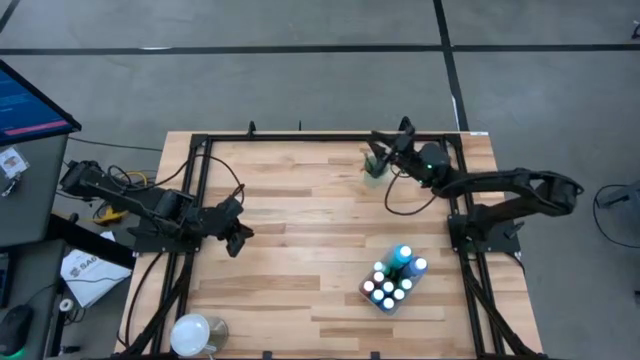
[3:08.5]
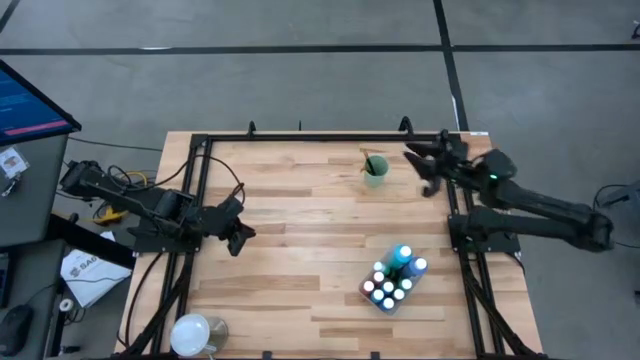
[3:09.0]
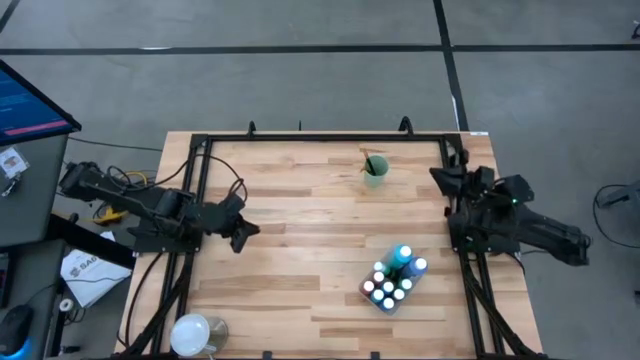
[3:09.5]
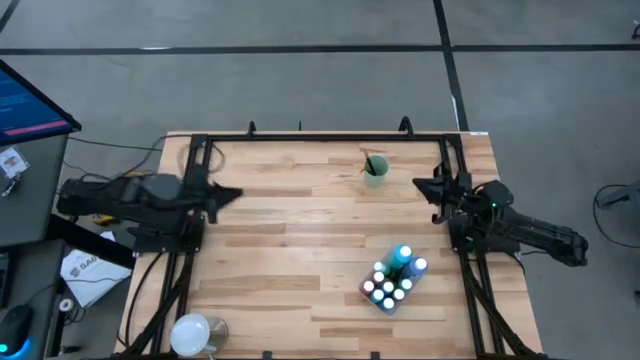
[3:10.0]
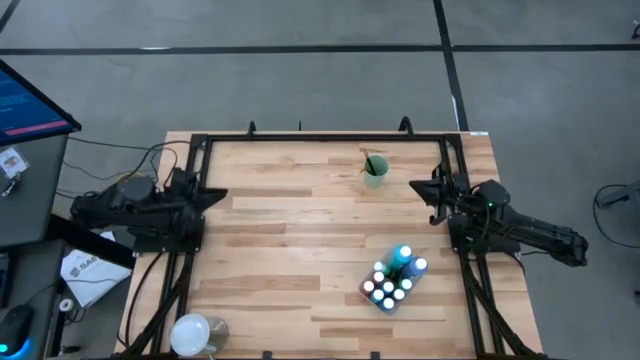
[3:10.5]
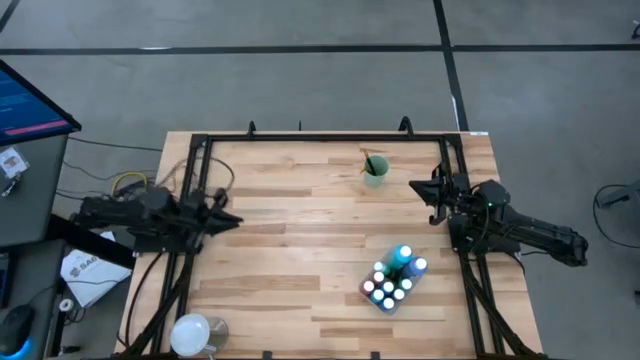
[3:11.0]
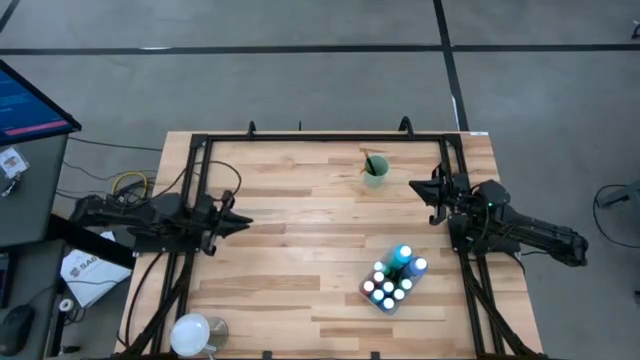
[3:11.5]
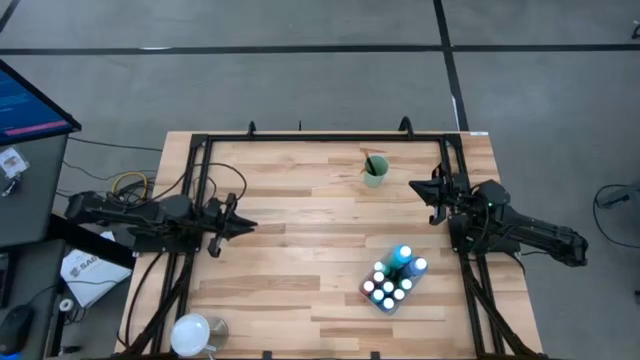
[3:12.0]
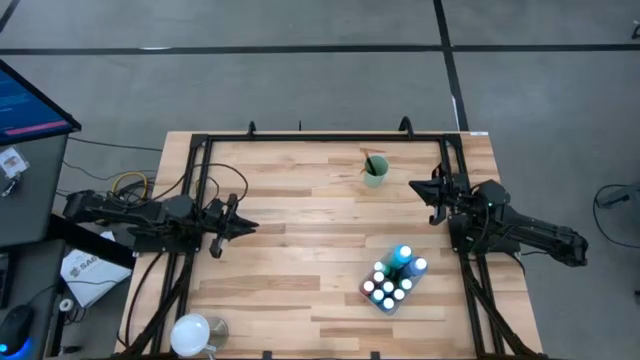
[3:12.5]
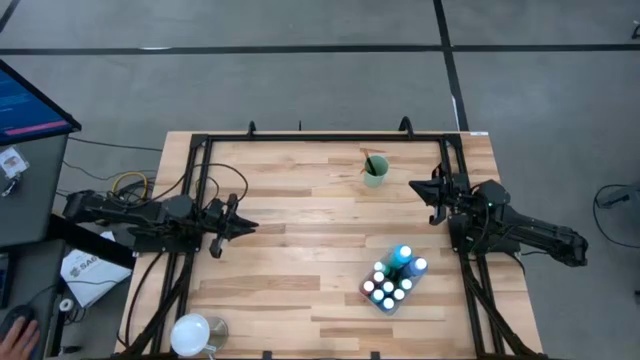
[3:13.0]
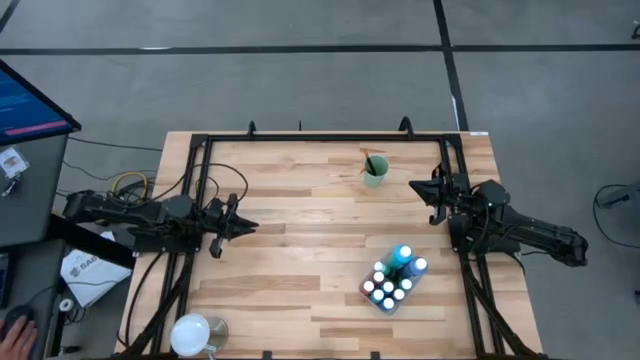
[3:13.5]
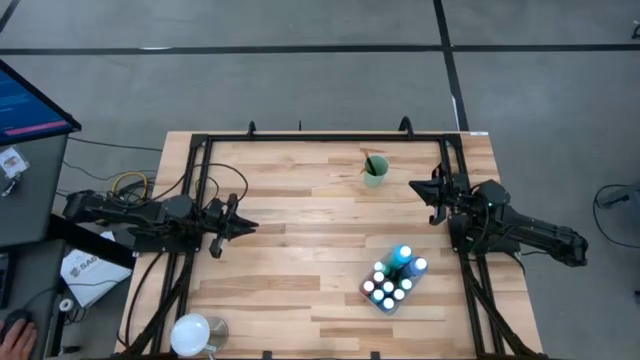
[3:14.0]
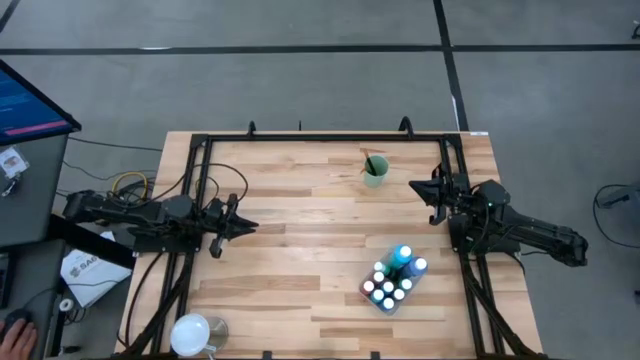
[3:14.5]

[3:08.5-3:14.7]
Task: Pick & Place Paint Supplies
Return to Home Position

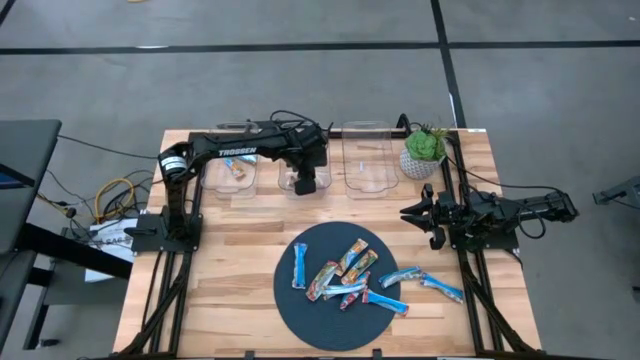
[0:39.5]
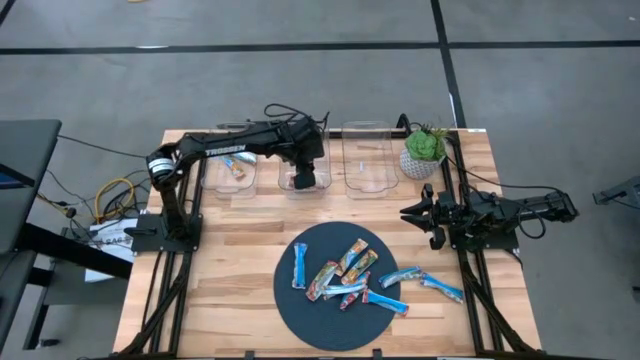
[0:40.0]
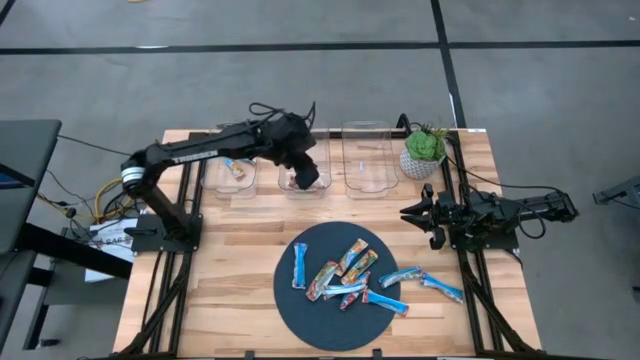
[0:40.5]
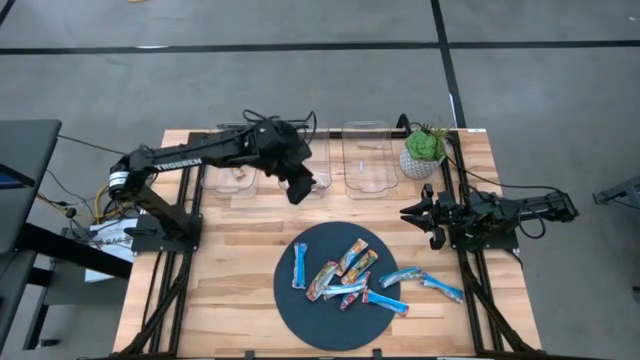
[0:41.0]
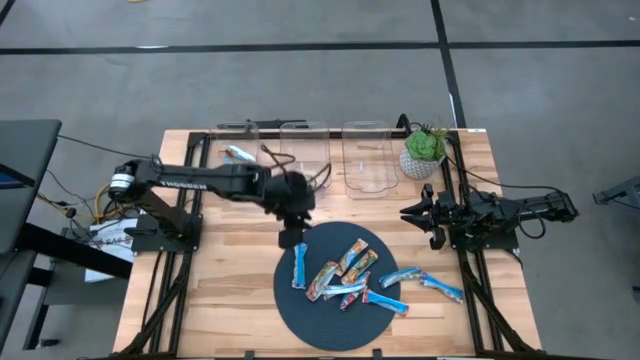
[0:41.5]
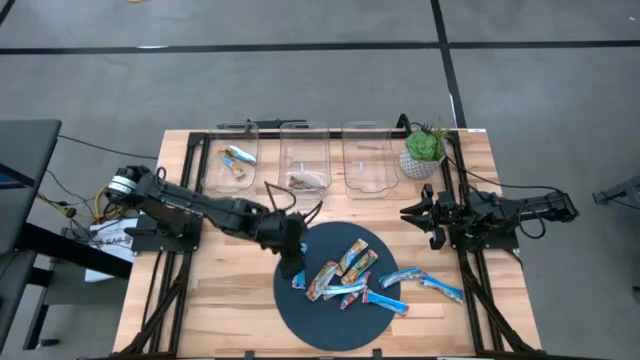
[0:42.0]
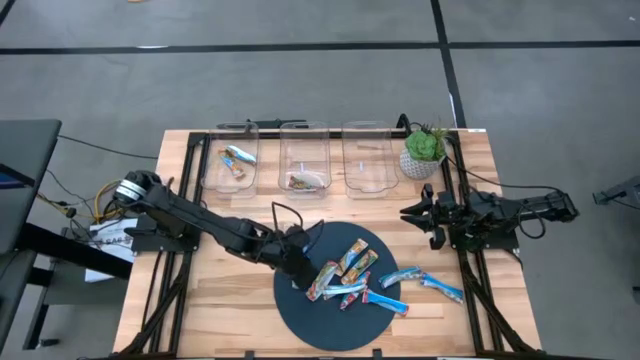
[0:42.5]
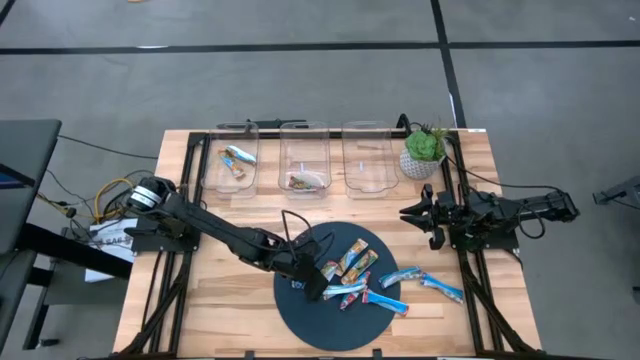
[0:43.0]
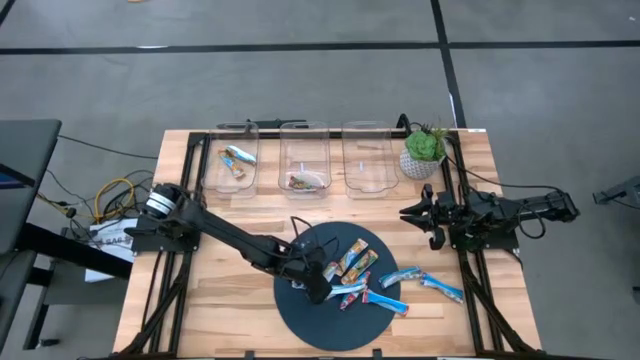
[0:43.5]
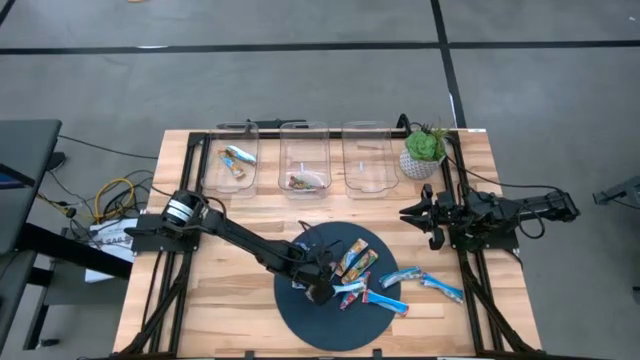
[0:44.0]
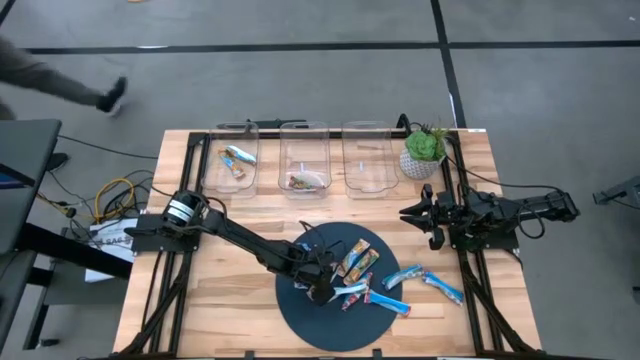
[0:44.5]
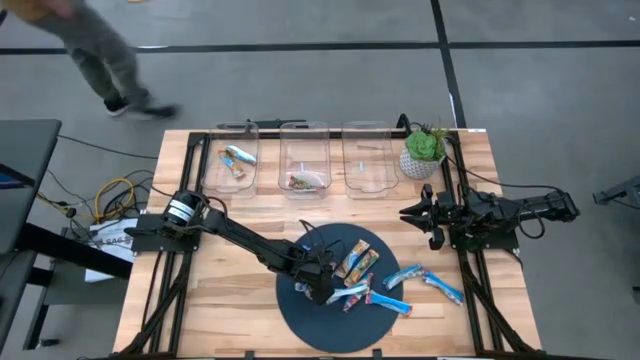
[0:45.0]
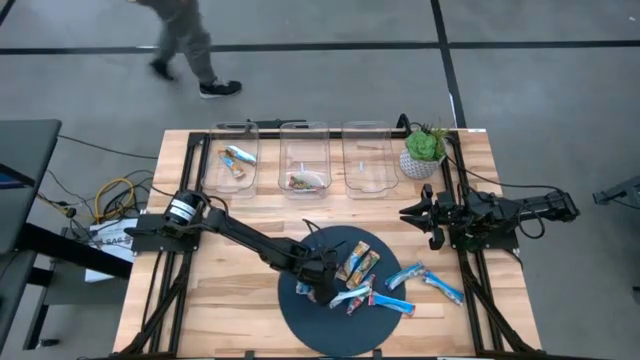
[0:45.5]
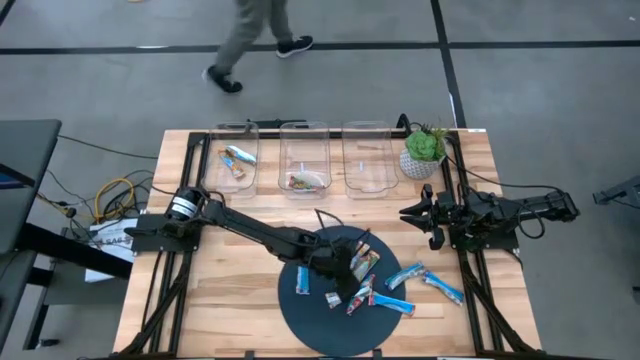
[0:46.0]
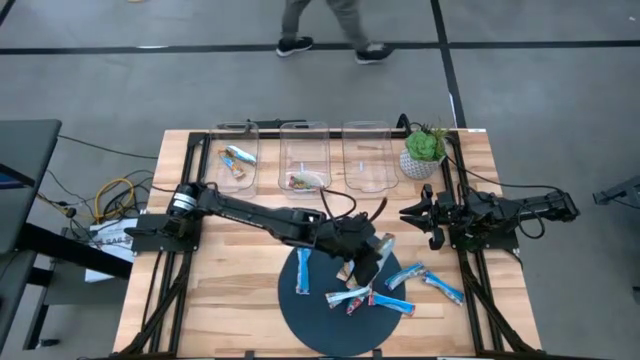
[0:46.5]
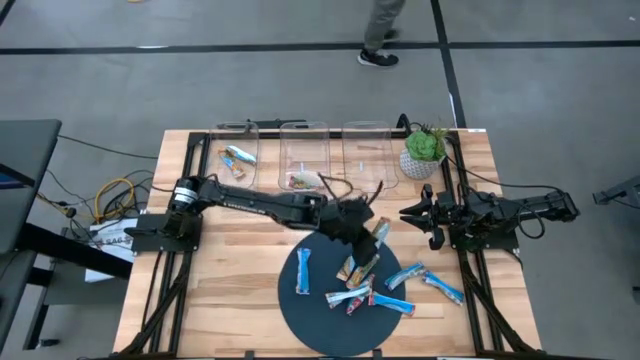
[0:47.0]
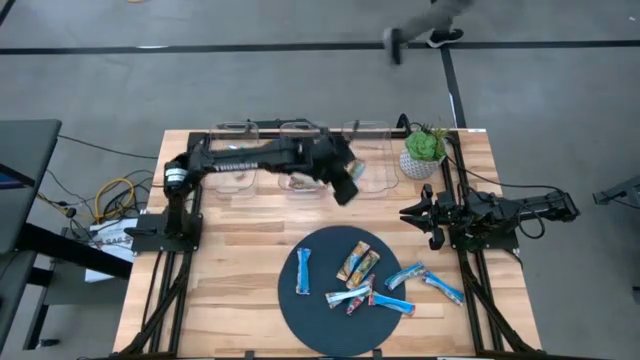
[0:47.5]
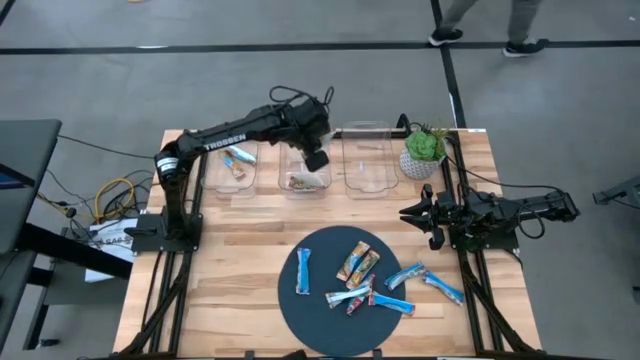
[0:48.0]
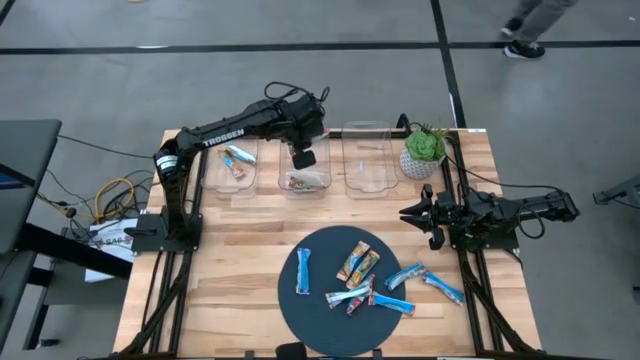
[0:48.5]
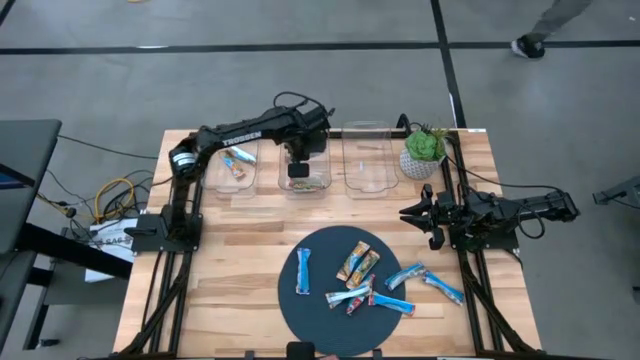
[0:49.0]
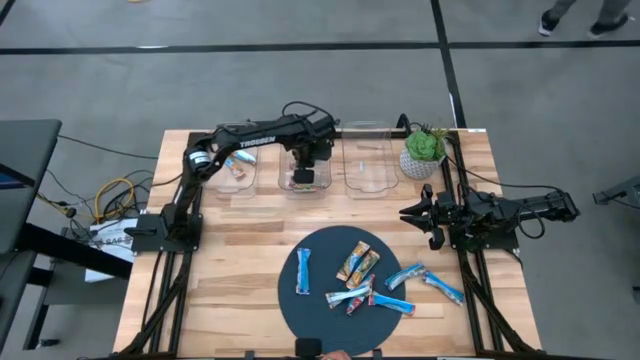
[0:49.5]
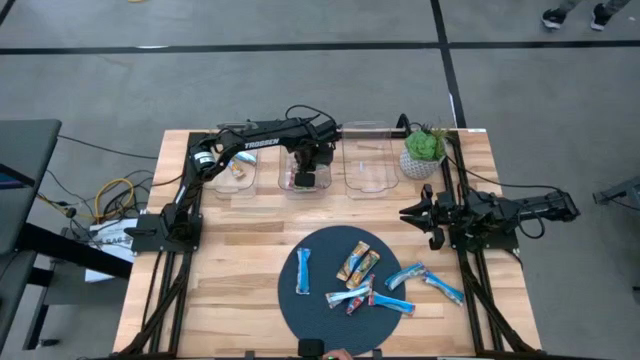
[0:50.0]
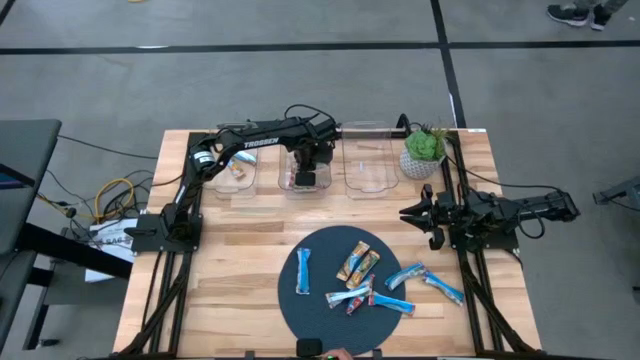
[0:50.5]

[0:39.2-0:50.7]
Task: Pick and place Granola Bars by type
Put the red granola bar into the middle transparent bin
